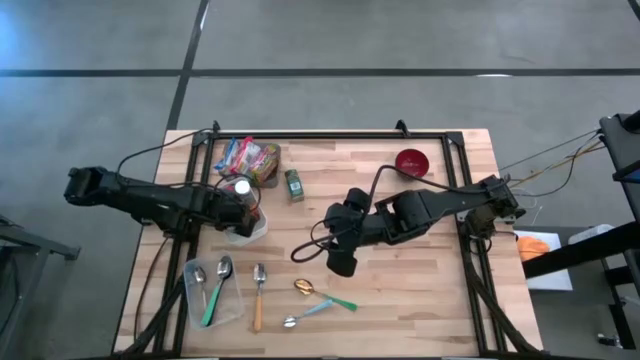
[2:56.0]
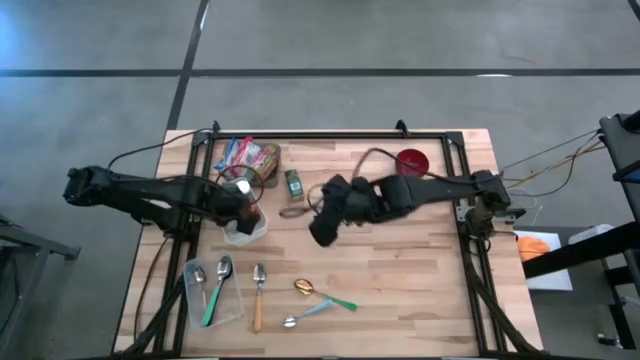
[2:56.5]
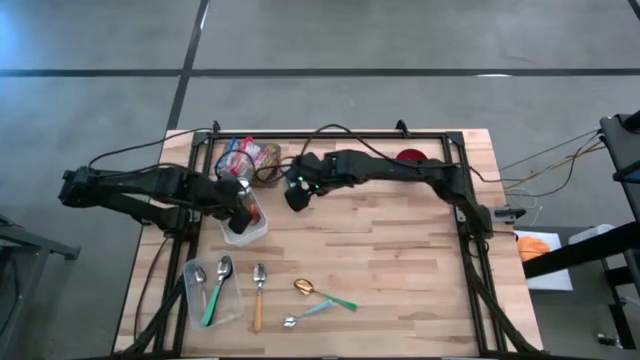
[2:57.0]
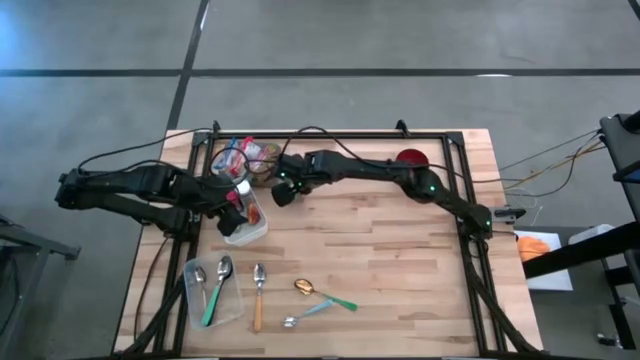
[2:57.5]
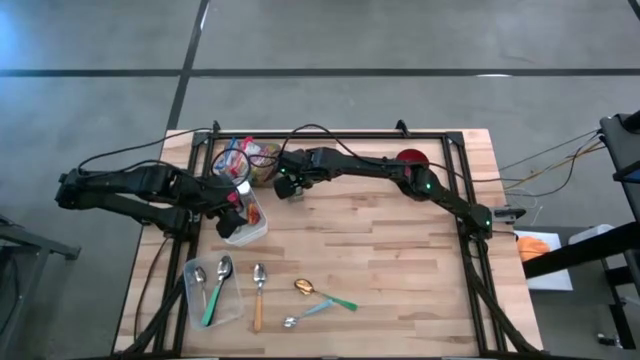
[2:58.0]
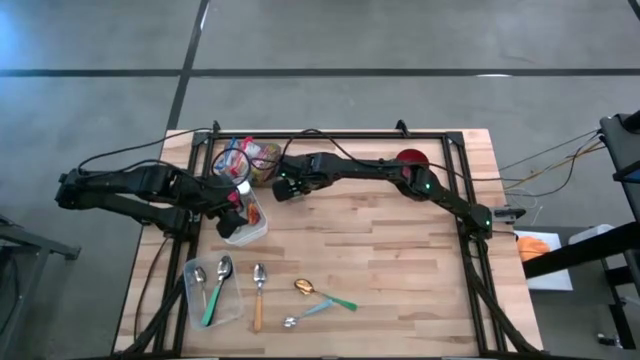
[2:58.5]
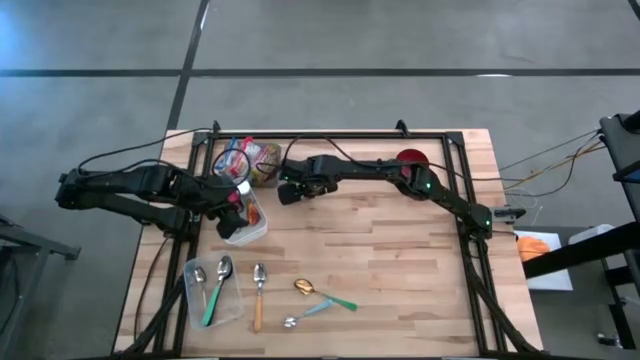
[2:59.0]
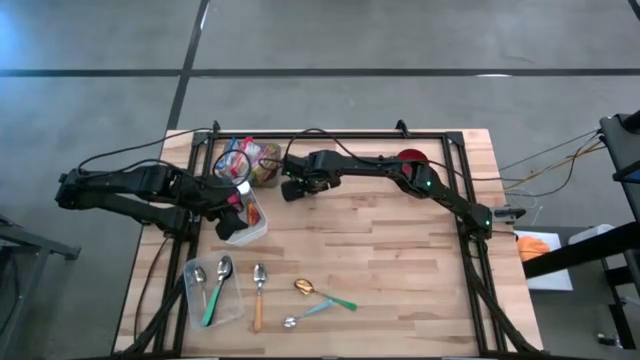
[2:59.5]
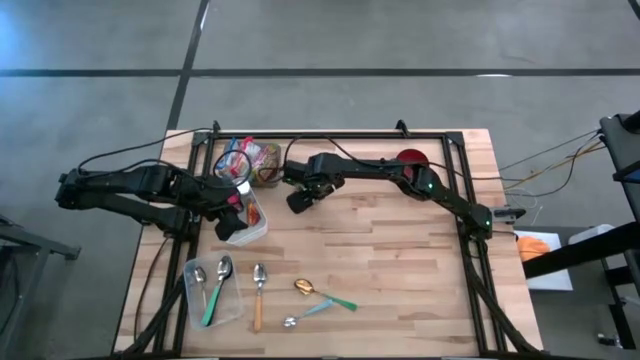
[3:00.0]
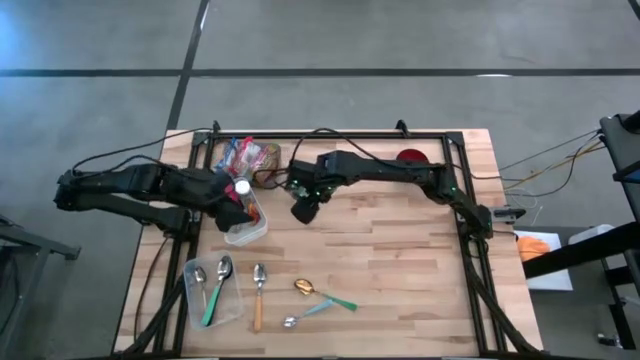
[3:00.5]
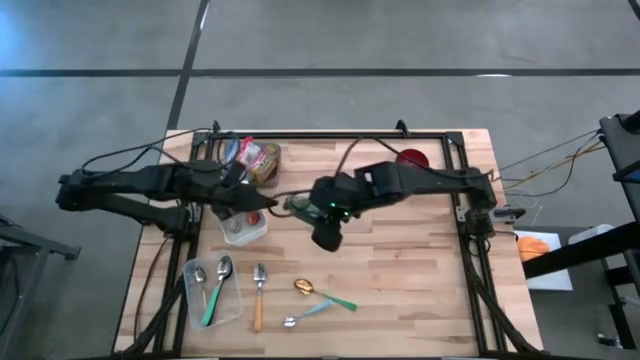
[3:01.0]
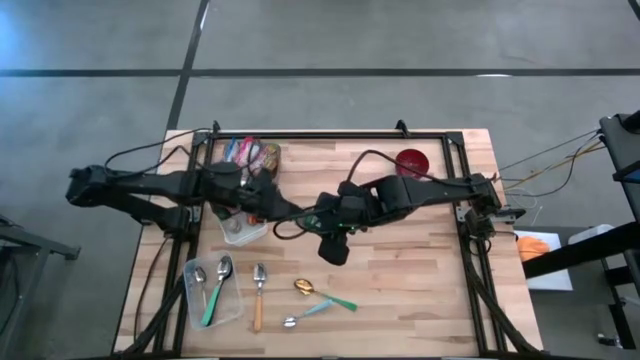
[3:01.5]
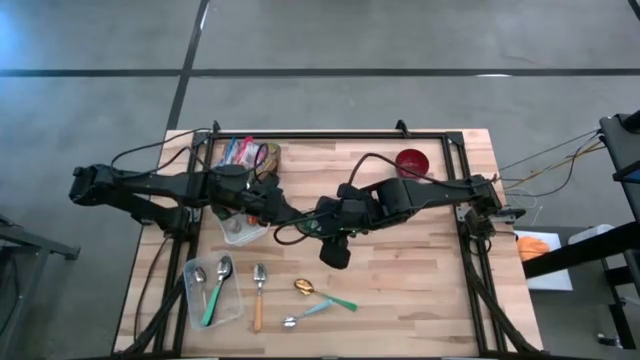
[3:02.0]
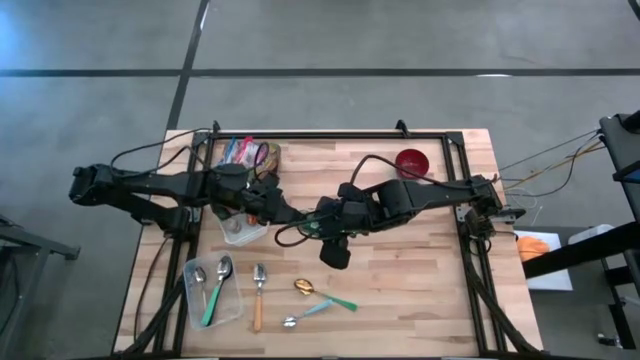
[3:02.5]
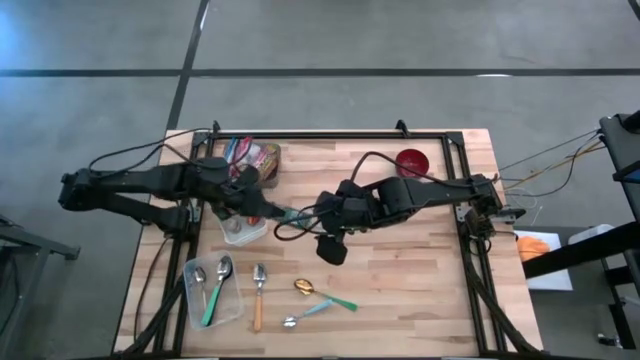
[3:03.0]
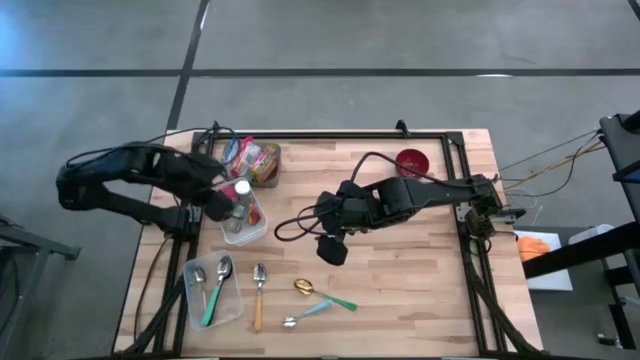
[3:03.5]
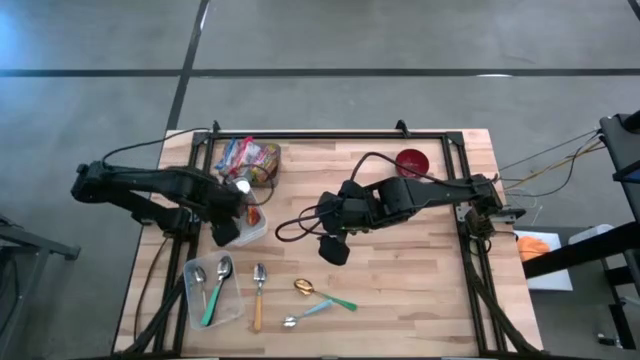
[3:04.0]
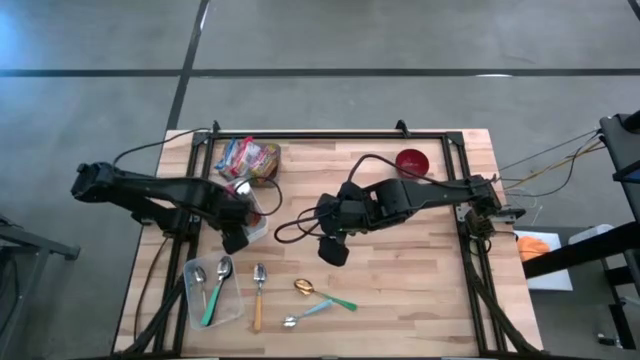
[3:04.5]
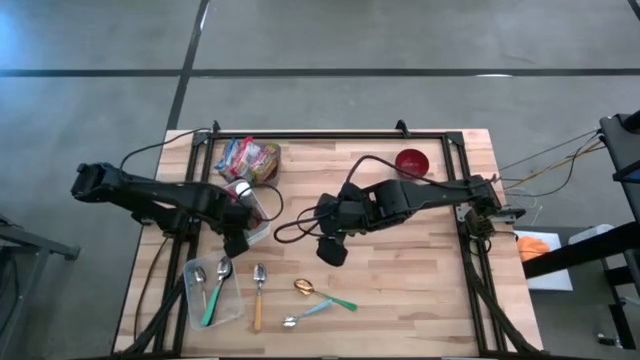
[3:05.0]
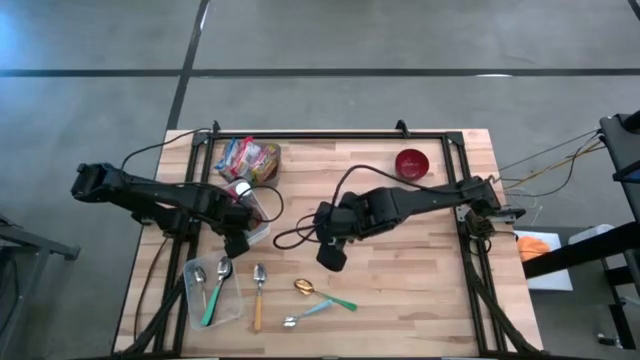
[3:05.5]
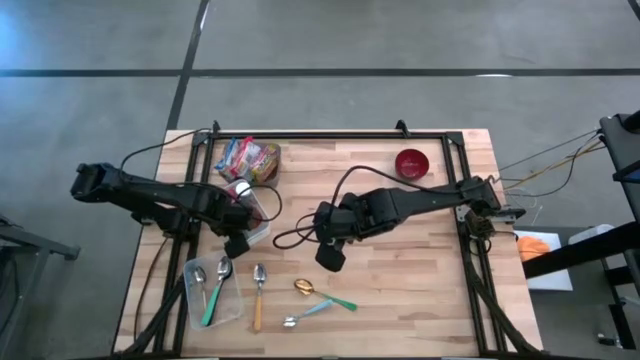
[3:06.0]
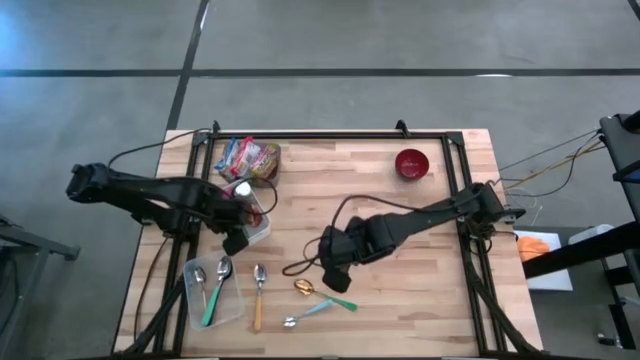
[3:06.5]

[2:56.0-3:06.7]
Put the green seasoning bottle into the white bin

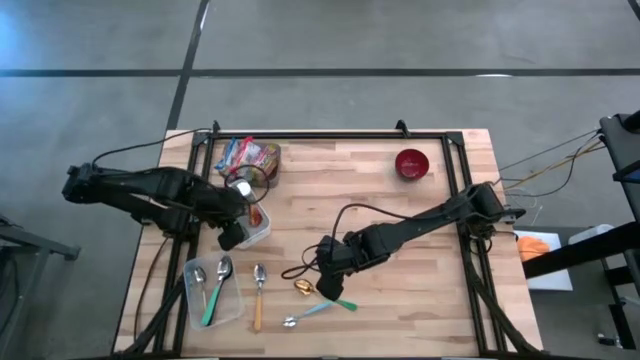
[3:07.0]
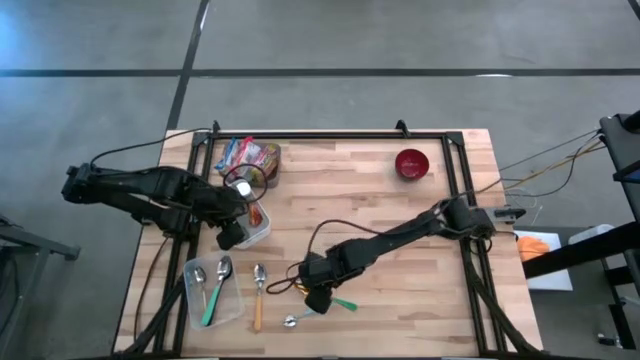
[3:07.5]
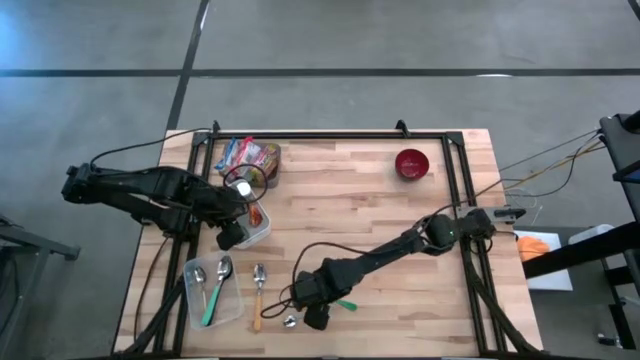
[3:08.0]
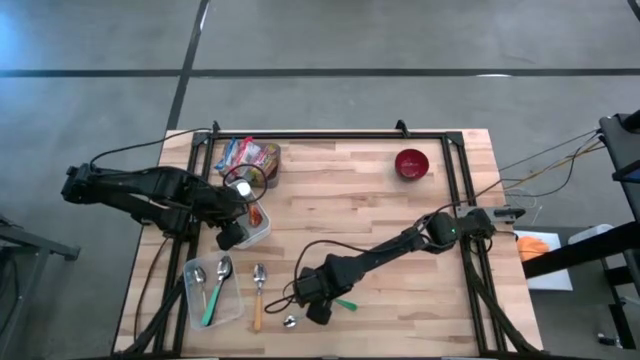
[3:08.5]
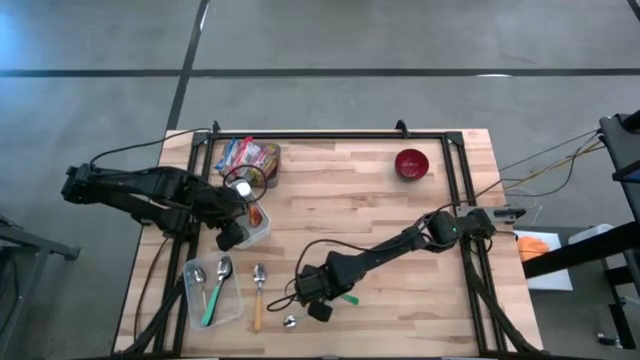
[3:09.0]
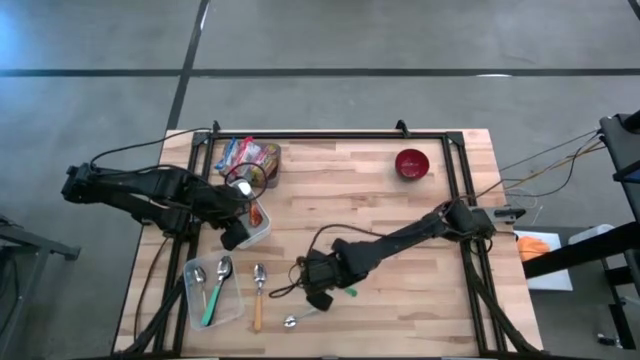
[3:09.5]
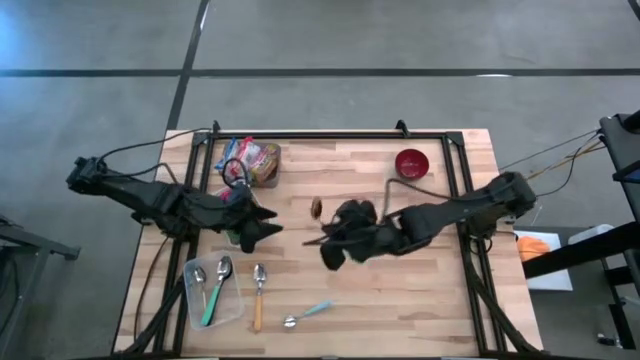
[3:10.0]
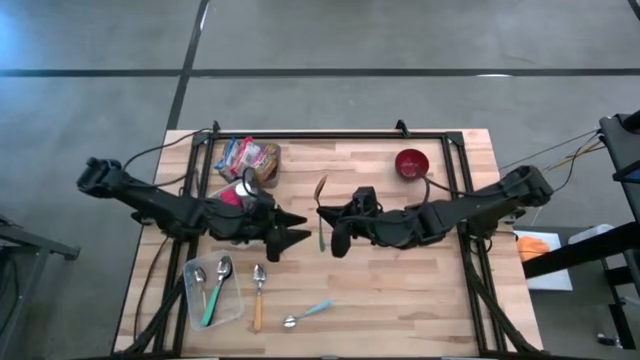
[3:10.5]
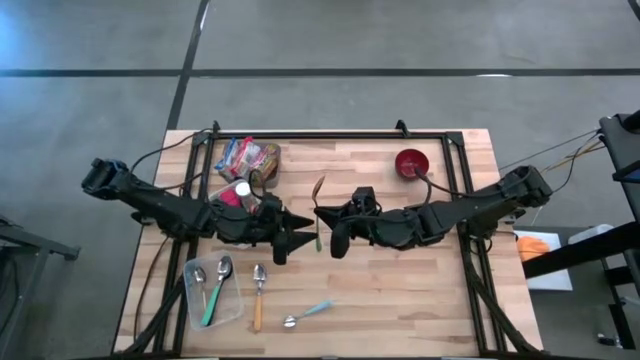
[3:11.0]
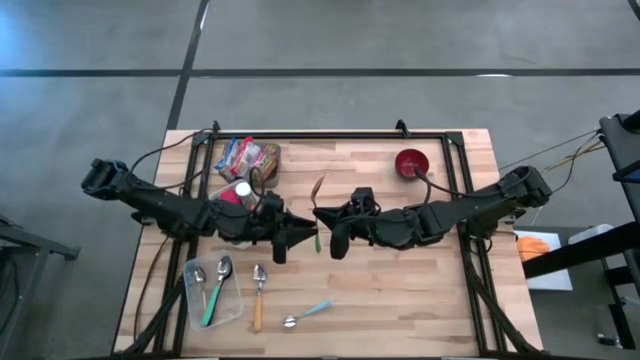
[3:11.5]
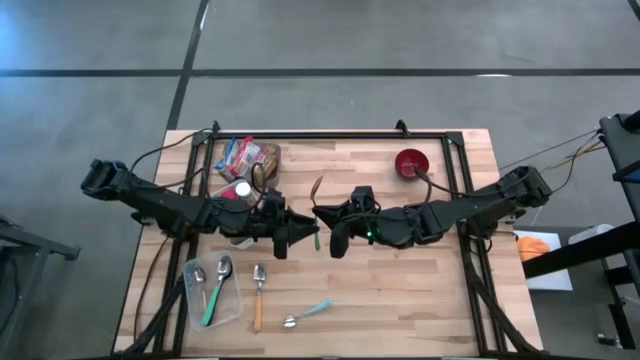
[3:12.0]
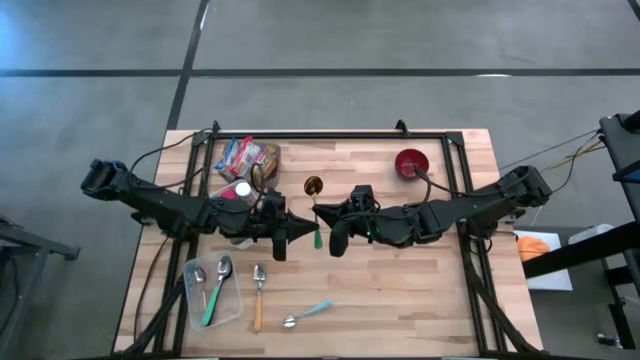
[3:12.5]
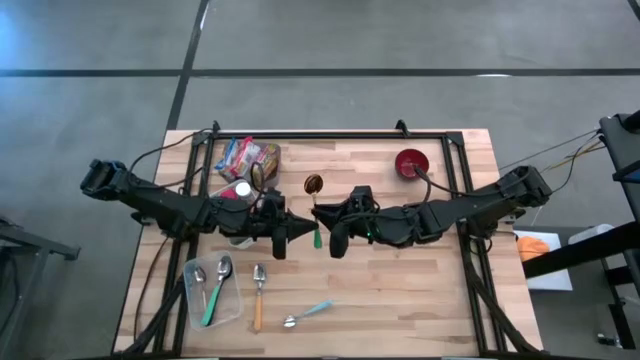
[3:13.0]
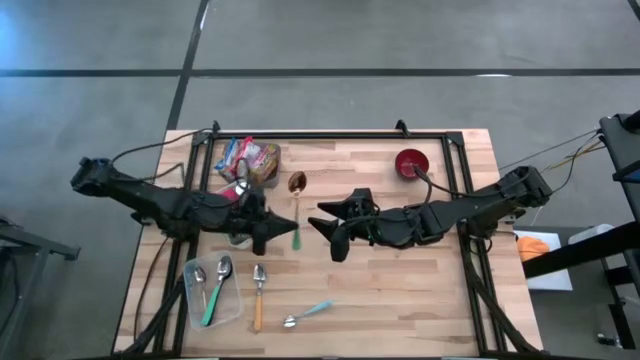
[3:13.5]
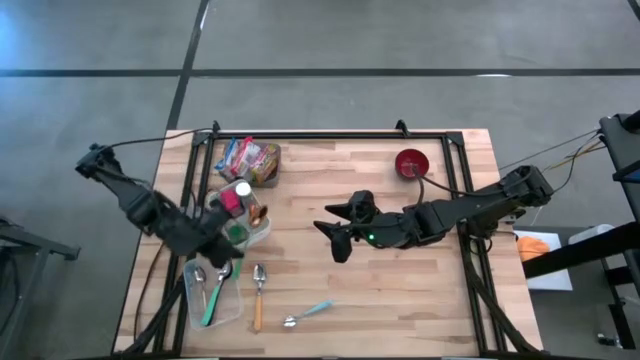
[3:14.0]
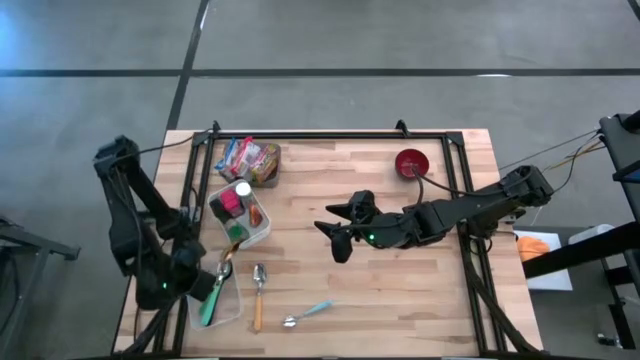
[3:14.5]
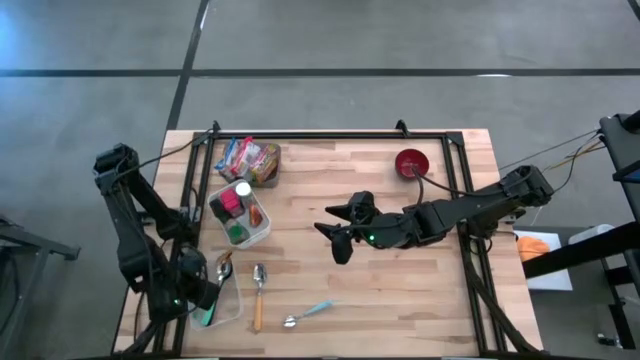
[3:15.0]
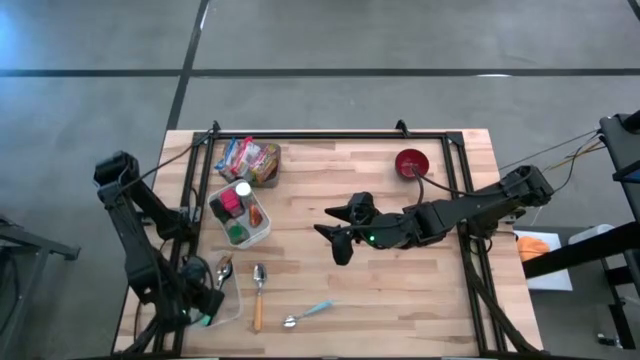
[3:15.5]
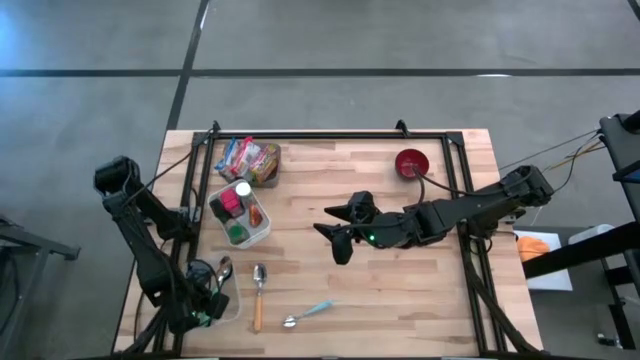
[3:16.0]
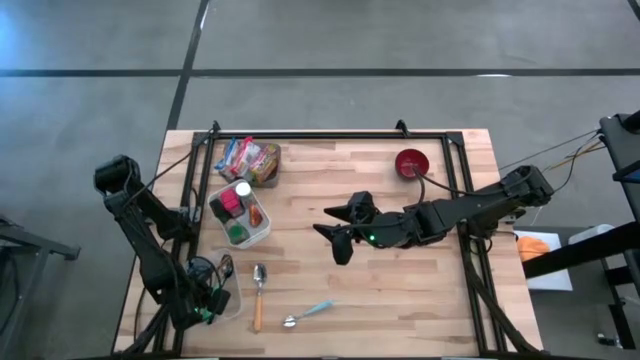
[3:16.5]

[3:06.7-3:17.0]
Put the green spoon into the transparent bin
